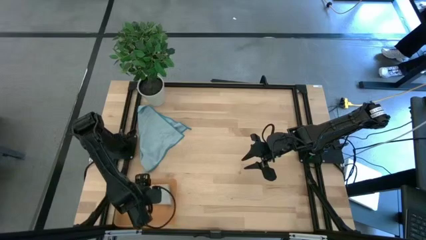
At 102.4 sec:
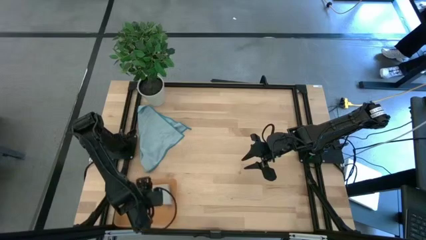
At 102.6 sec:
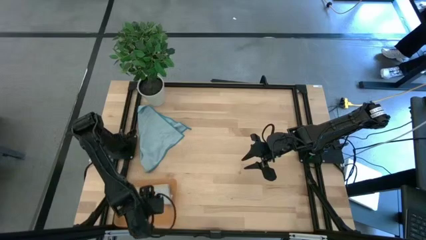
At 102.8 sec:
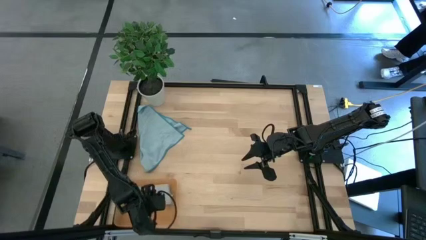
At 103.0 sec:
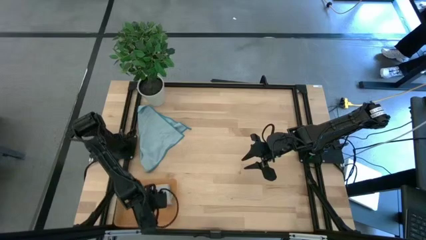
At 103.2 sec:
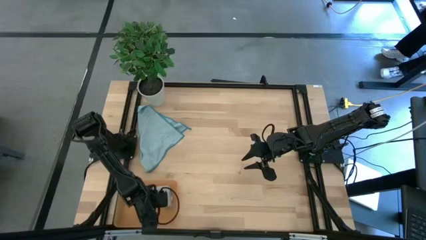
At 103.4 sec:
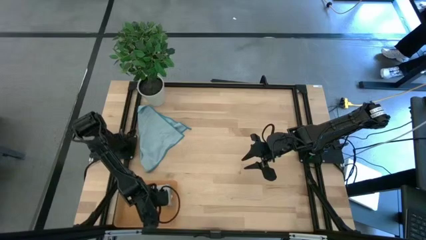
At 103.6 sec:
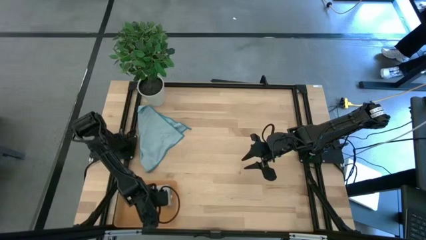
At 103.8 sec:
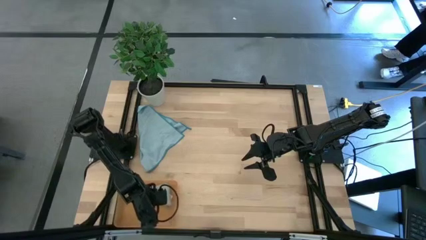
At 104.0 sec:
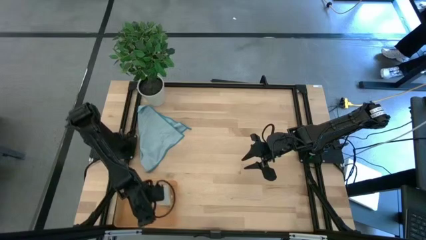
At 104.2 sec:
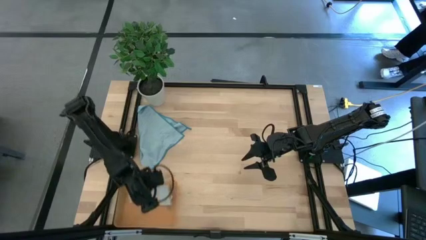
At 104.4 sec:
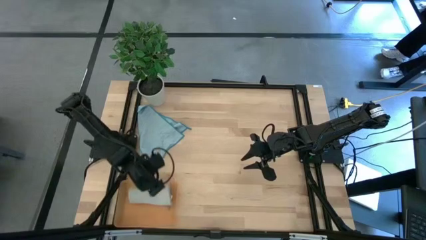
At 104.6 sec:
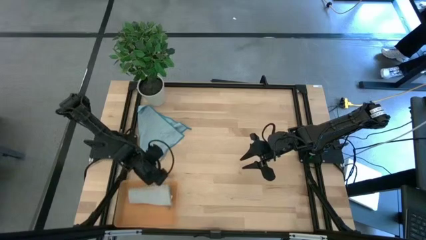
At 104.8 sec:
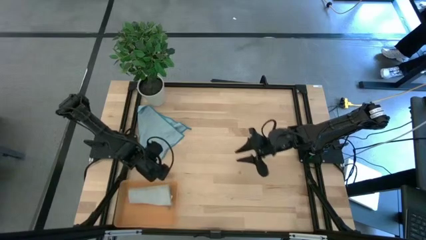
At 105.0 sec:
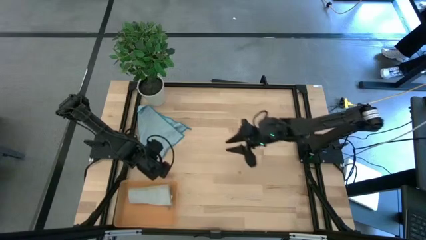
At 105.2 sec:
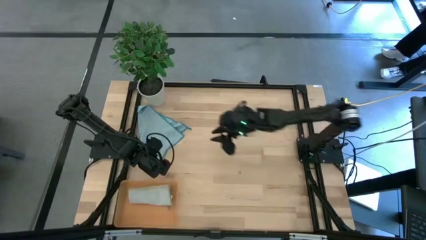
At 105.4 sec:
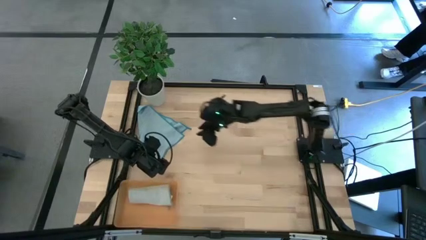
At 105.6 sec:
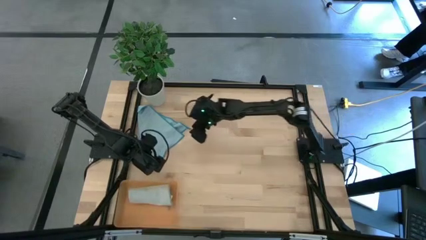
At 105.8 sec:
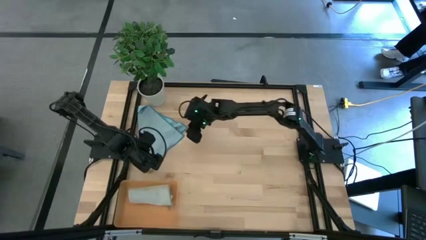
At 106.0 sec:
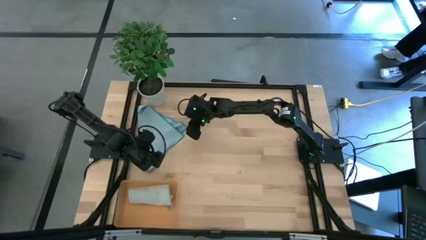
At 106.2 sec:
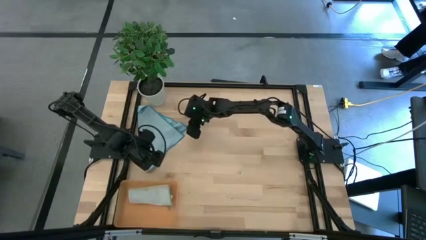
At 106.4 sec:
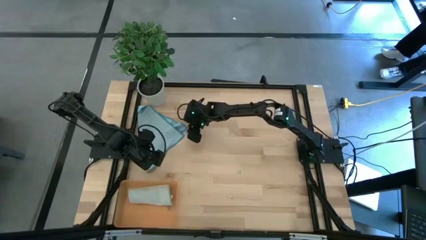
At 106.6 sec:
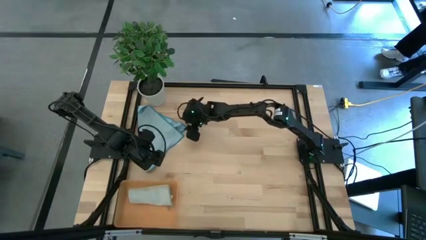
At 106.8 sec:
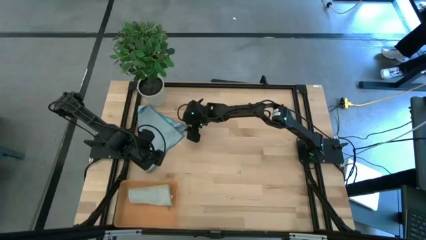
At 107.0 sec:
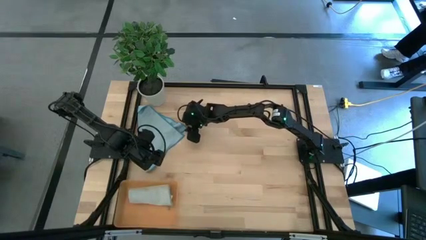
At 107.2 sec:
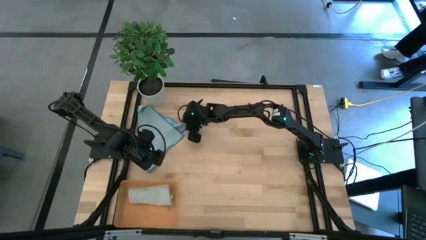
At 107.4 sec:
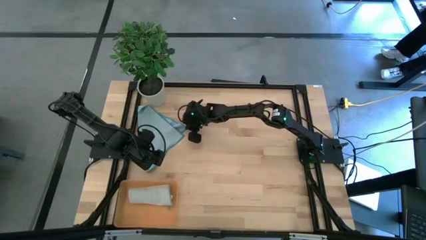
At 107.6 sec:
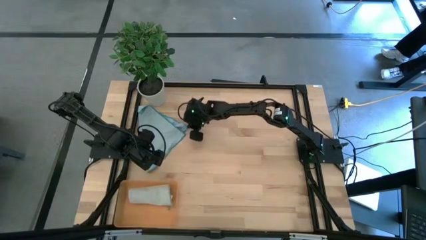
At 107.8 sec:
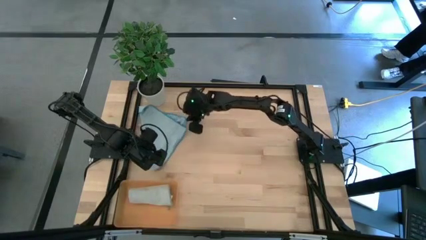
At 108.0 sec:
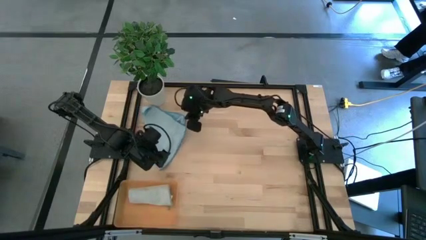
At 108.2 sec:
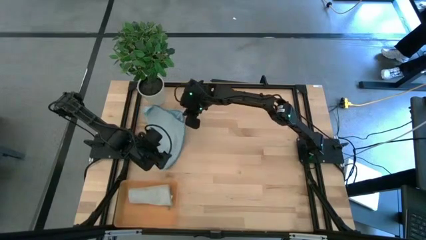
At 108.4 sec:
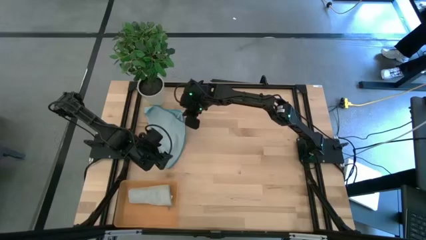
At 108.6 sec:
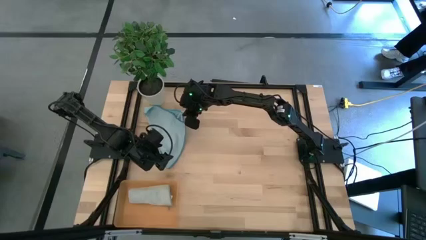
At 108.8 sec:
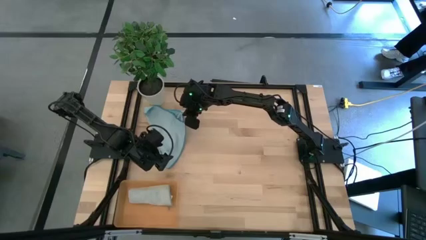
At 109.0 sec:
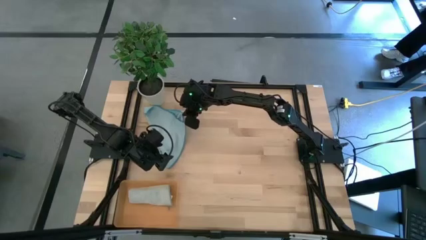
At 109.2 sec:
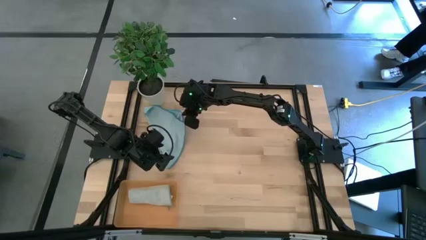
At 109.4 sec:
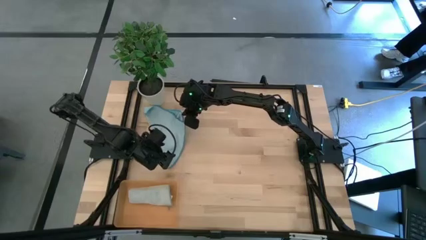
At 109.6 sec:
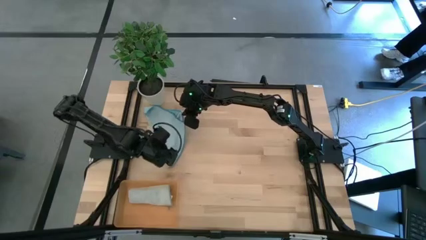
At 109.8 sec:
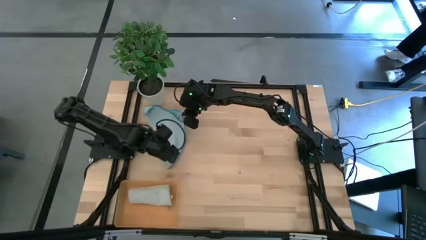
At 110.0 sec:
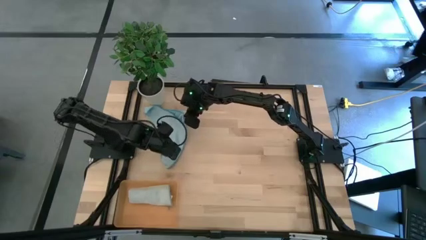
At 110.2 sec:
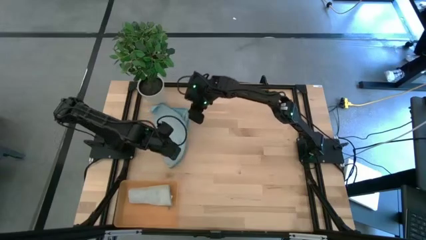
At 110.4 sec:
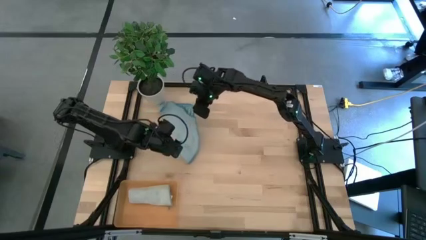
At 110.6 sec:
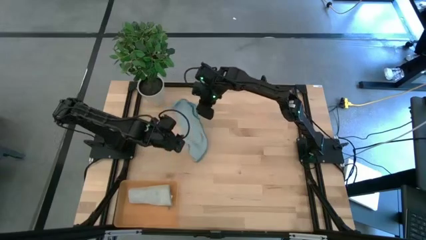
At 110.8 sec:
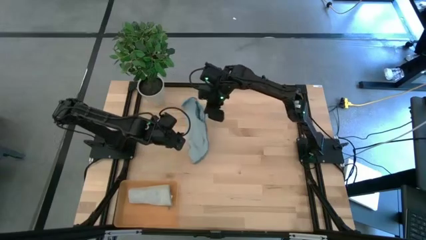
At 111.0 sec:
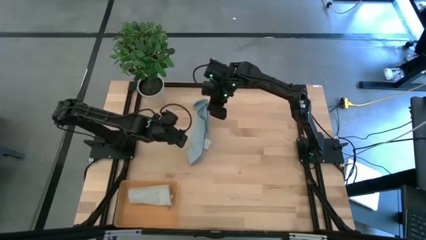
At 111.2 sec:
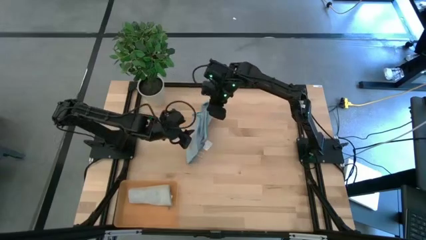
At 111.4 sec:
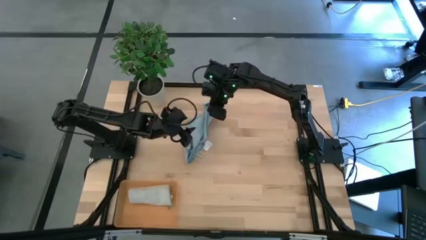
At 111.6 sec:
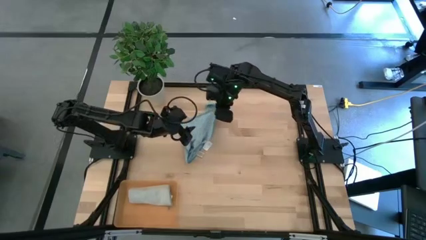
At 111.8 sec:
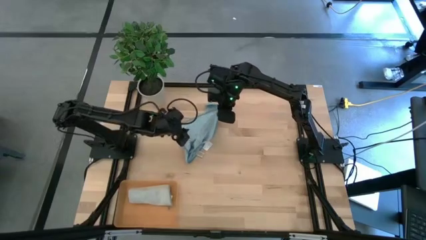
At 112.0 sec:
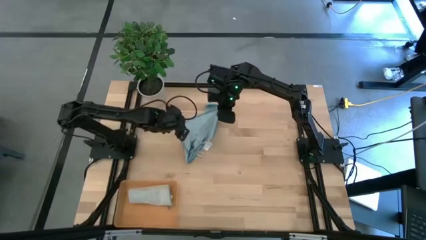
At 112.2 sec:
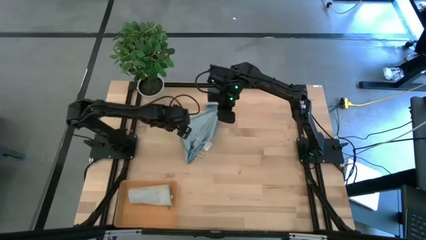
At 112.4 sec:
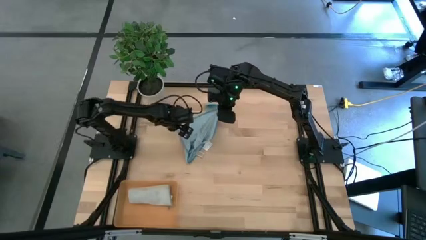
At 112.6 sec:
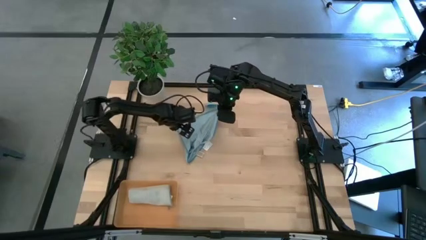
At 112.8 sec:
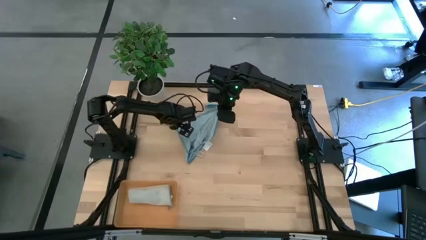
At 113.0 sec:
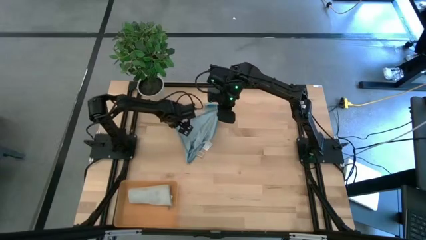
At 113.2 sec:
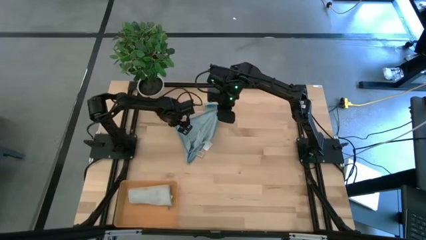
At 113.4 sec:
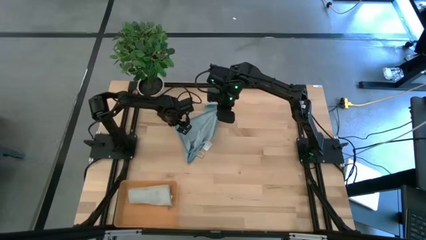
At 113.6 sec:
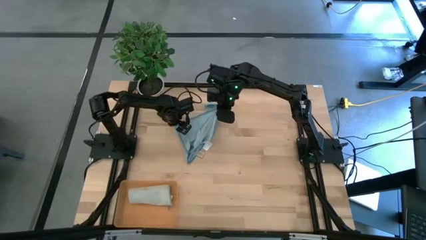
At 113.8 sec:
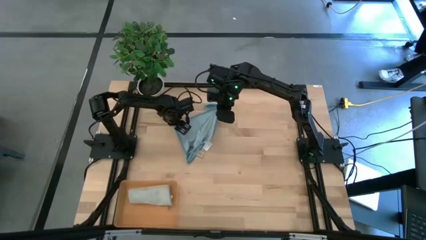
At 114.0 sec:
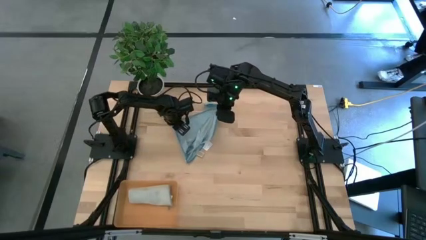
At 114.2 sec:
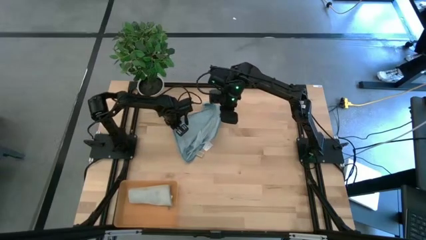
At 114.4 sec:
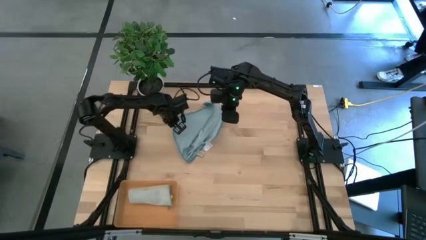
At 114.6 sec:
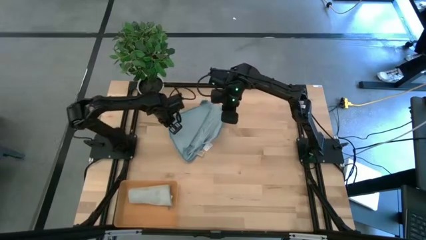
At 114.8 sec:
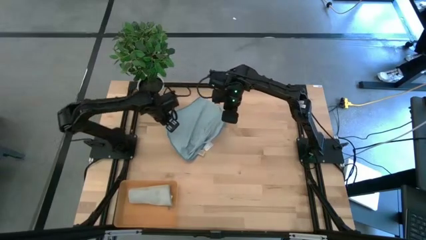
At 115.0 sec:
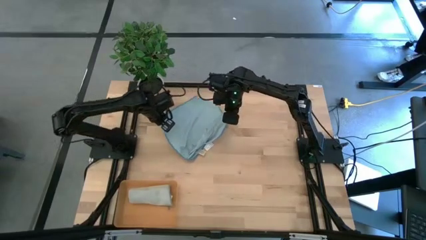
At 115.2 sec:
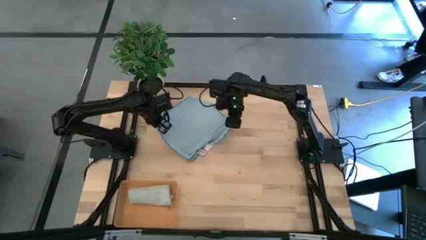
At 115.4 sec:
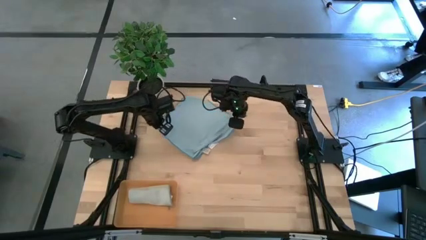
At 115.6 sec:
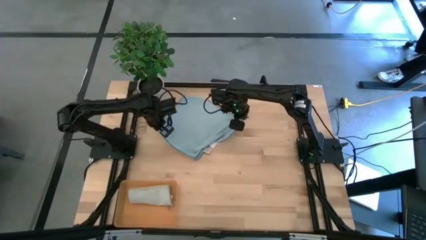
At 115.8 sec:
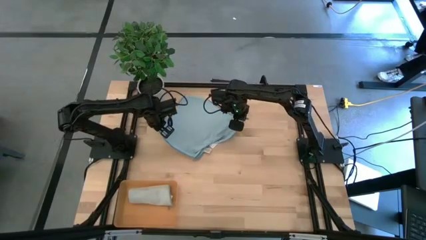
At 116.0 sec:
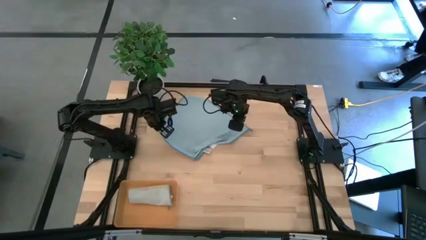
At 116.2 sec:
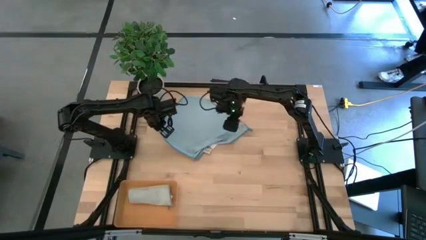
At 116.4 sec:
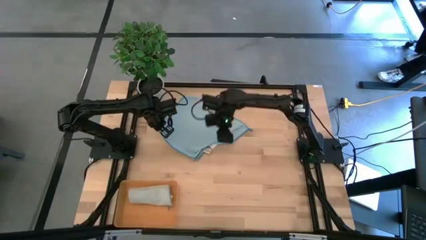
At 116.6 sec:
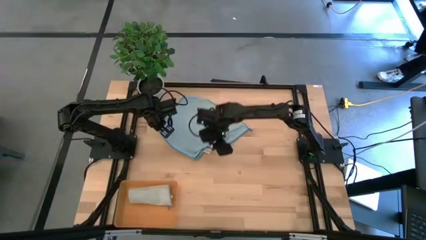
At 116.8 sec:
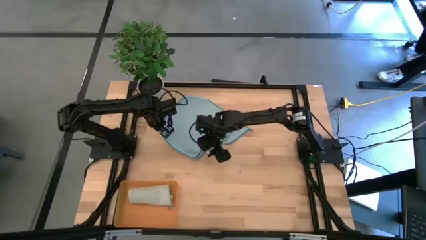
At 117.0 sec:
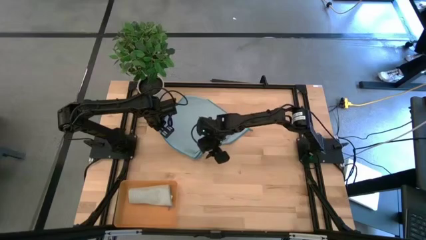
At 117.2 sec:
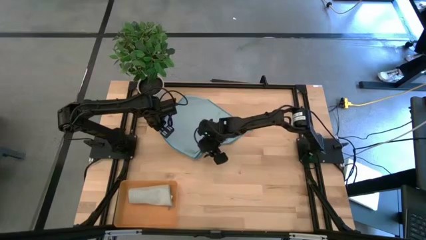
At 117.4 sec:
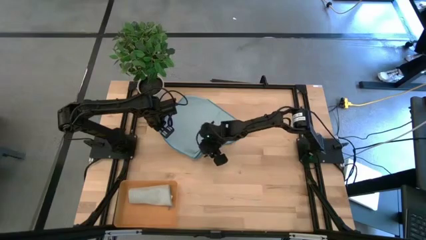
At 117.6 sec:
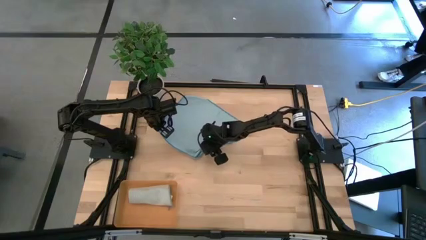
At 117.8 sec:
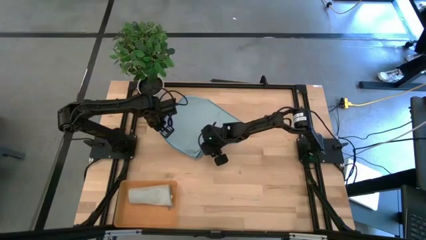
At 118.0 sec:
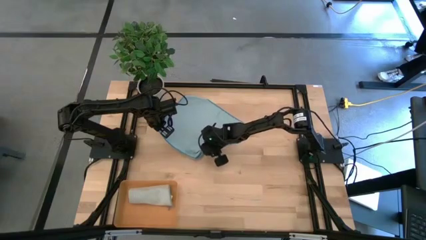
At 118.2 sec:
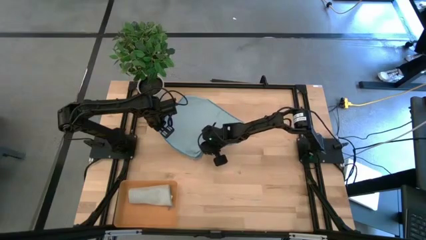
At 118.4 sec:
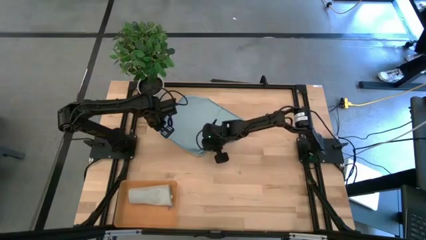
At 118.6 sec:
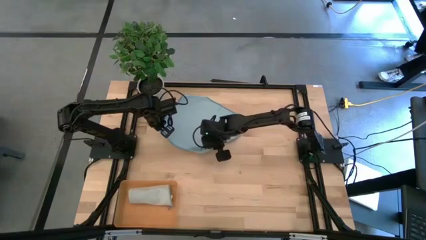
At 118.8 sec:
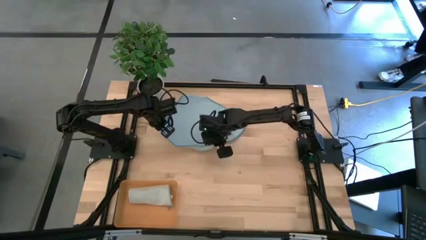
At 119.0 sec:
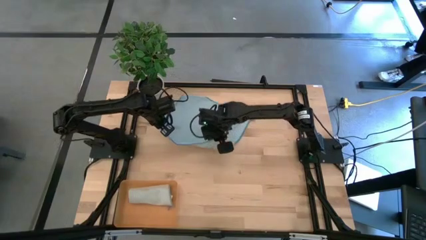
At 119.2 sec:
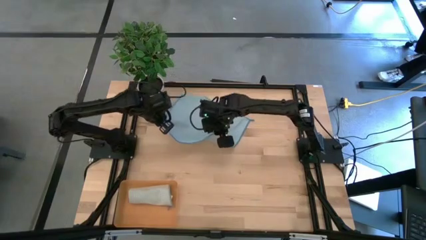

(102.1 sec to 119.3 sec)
Task: Roll microfiber towels into tight, uniform cylinder then place into a basket
Fold the blue microfiber towel
